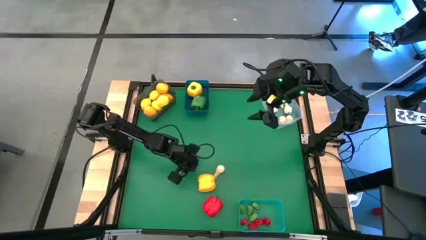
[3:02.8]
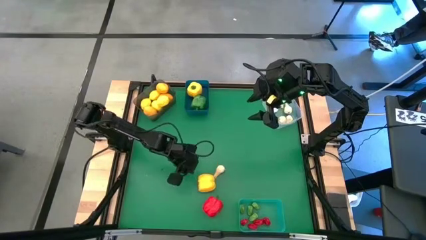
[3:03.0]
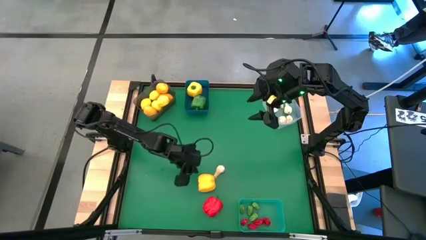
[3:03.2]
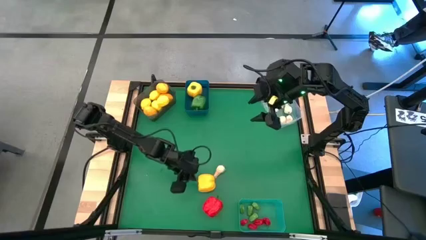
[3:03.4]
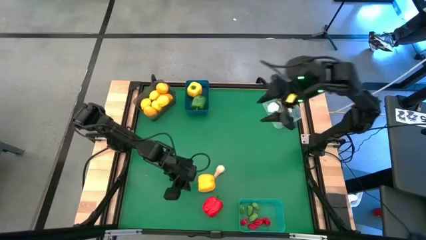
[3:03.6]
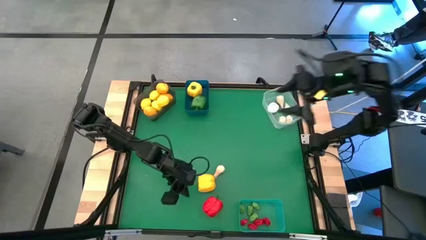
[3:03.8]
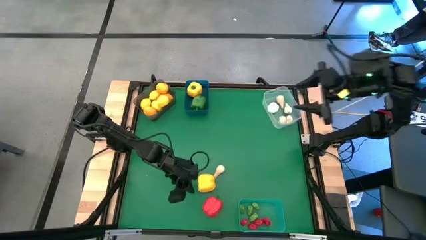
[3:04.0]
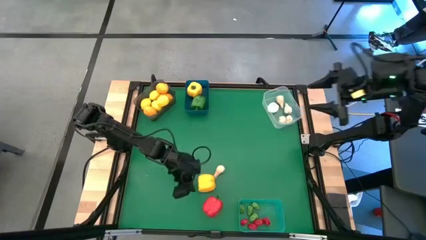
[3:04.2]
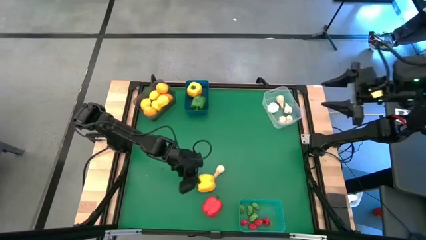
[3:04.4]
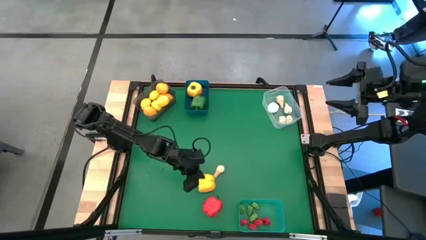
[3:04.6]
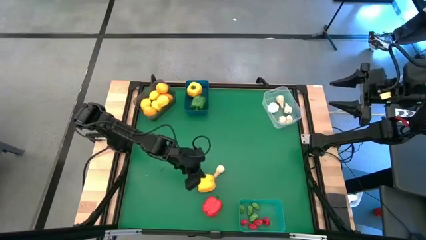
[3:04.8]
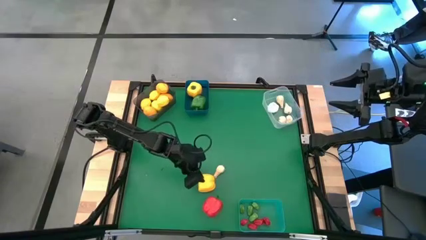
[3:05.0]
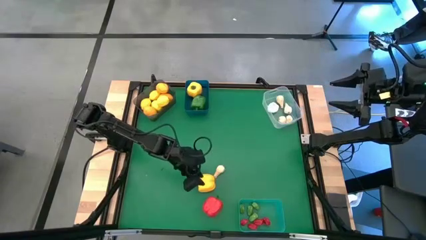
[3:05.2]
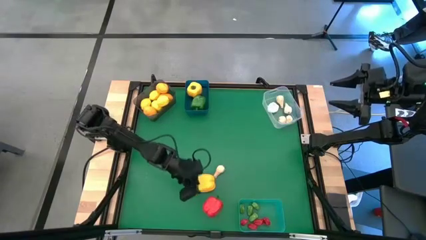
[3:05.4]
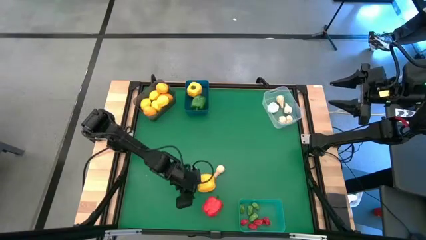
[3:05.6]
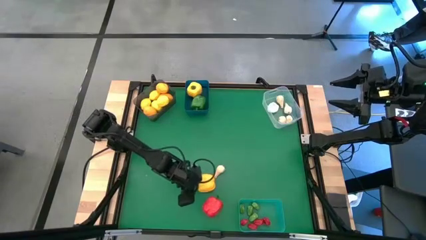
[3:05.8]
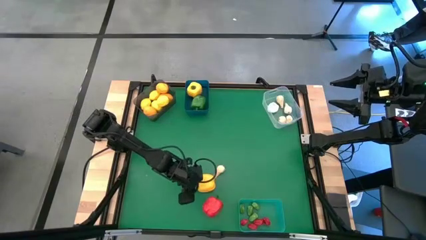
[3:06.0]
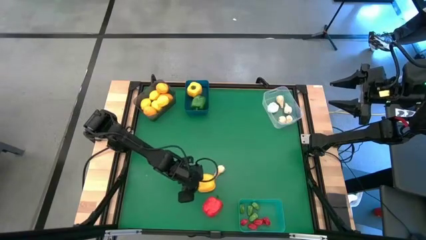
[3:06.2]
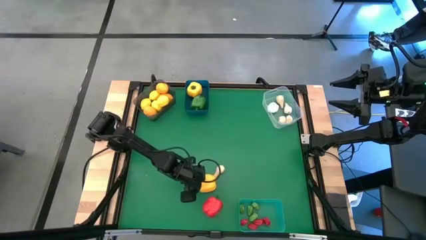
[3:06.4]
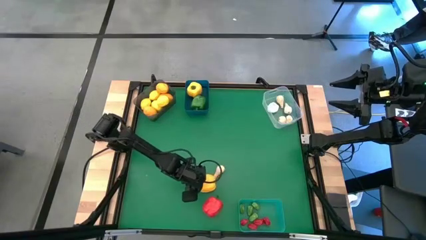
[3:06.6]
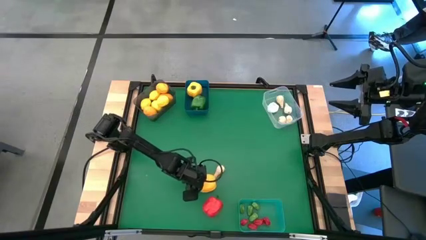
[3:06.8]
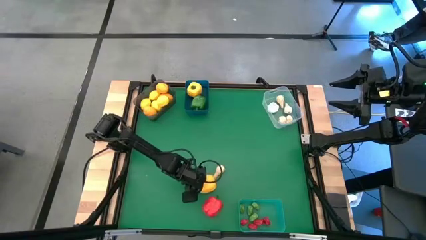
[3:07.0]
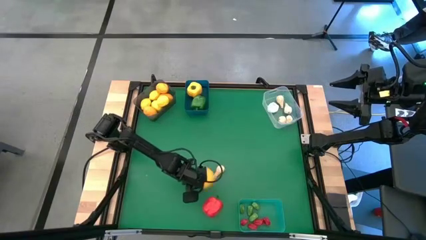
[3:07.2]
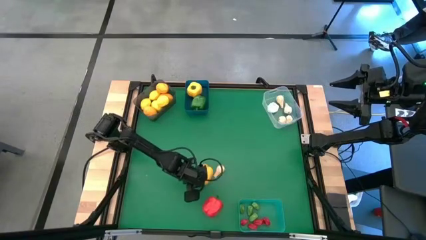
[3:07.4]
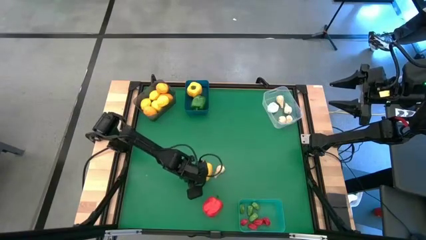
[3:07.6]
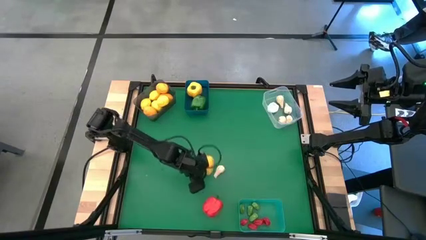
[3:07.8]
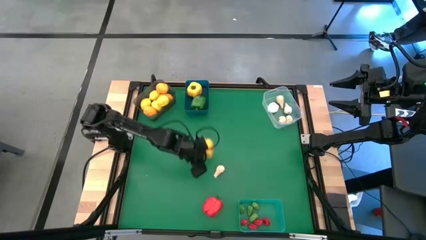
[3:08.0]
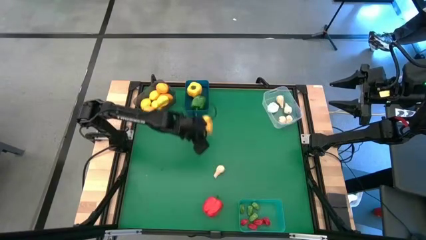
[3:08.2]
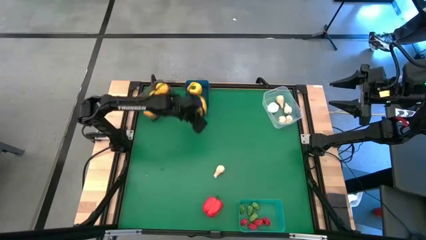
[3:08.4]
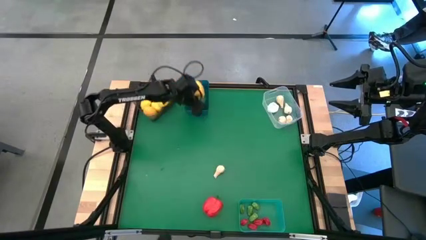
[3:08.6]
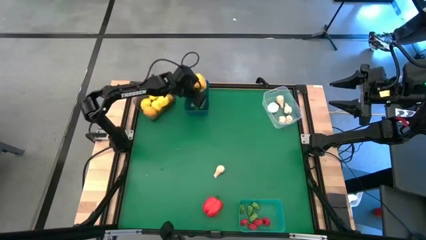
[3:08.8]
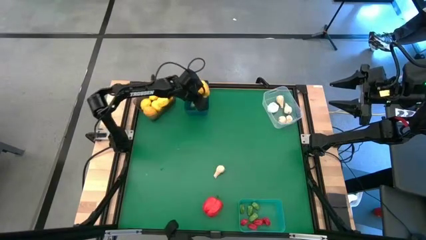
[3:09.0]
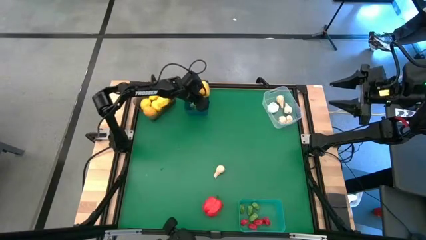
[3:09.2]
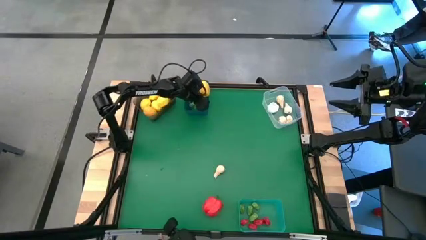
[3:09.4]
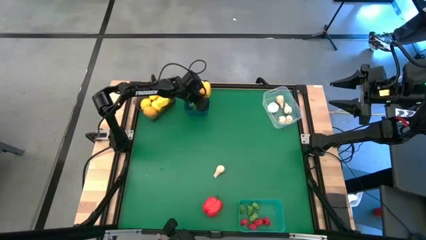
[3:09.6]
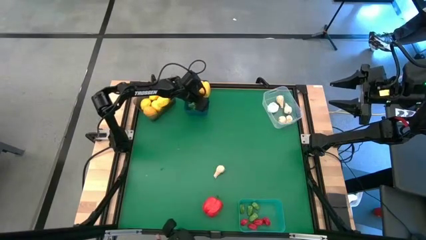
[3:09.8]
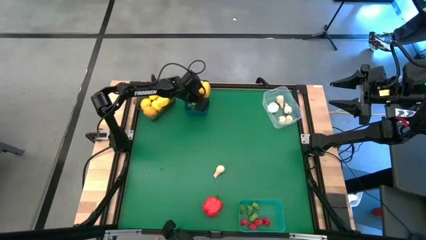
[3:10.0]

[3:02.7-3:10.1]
Task: Sort produce into baskets
Put the yellow bell pepper into the blue bin

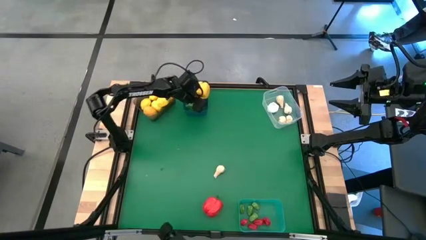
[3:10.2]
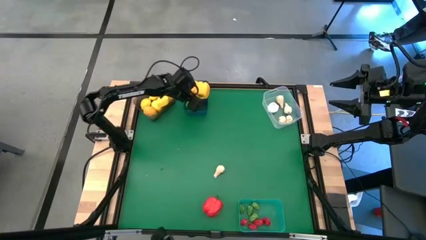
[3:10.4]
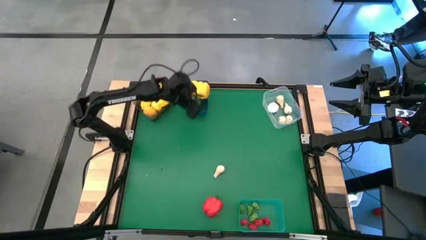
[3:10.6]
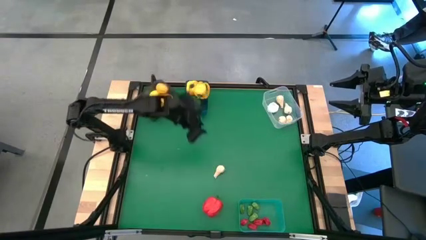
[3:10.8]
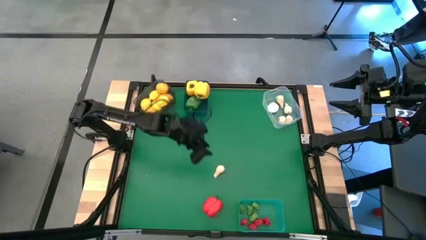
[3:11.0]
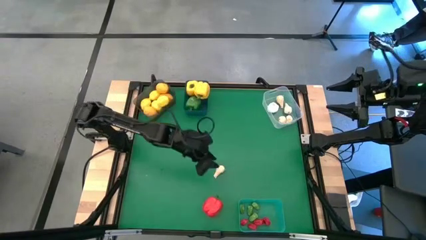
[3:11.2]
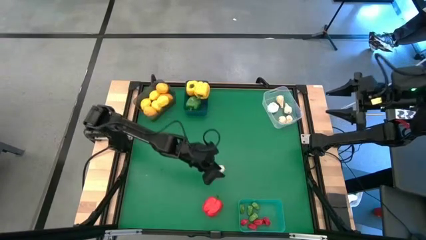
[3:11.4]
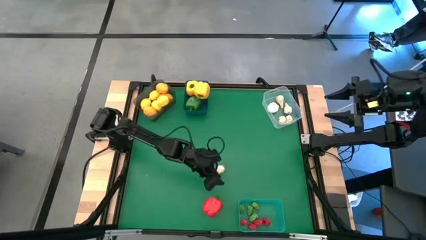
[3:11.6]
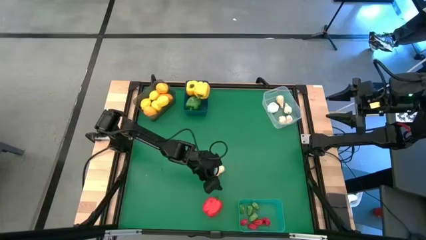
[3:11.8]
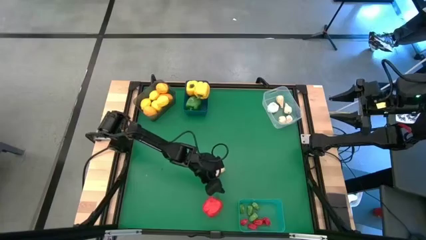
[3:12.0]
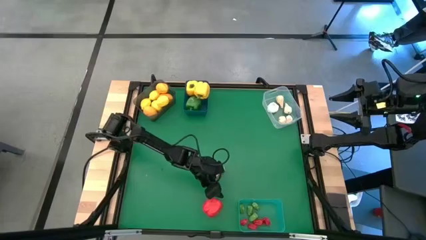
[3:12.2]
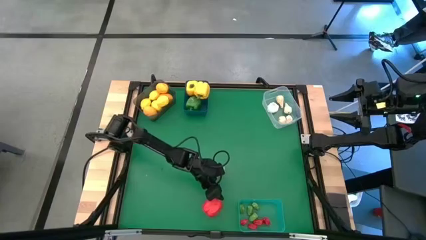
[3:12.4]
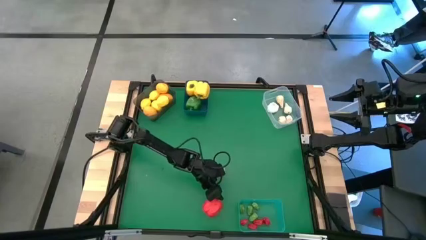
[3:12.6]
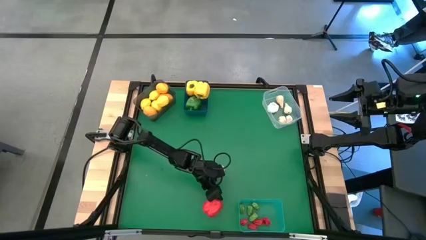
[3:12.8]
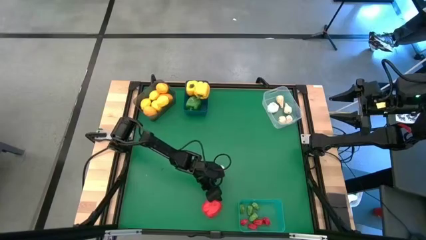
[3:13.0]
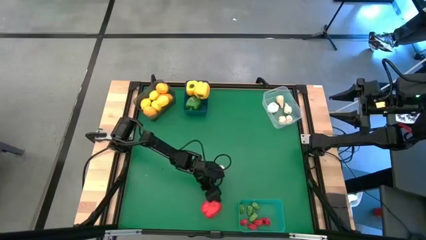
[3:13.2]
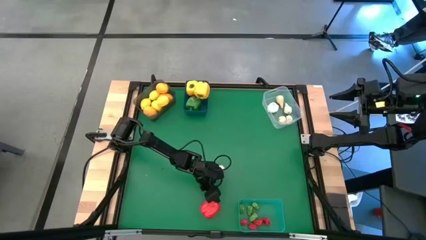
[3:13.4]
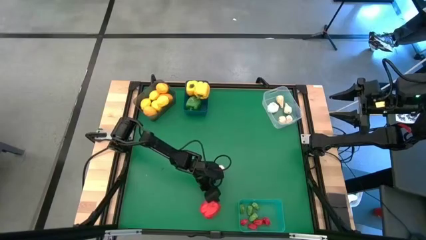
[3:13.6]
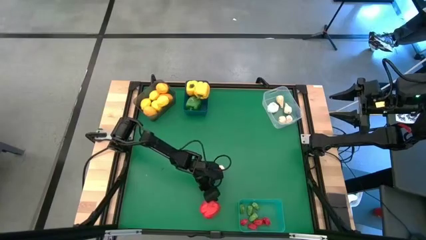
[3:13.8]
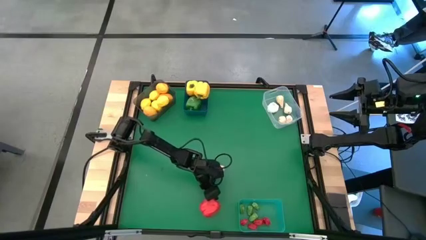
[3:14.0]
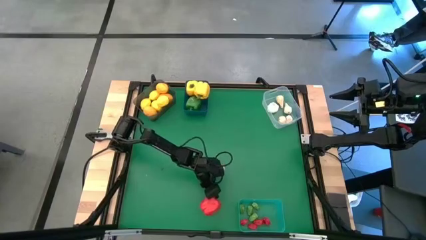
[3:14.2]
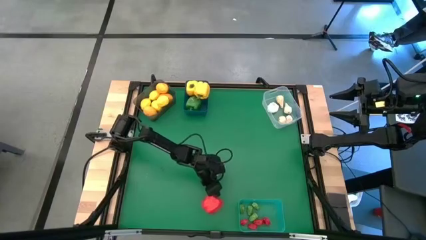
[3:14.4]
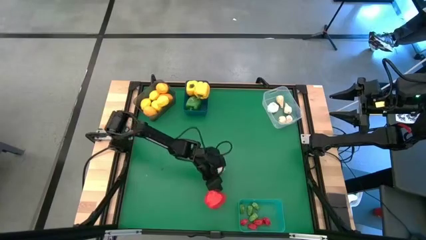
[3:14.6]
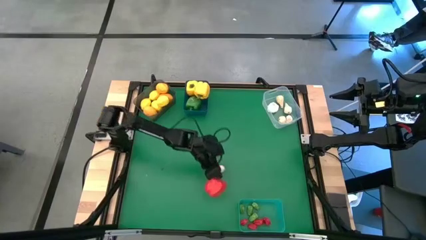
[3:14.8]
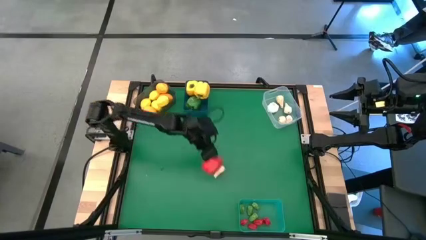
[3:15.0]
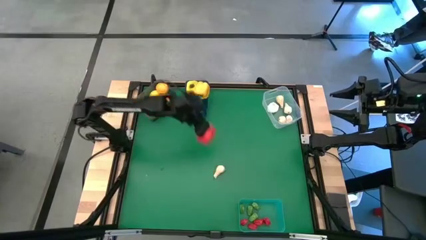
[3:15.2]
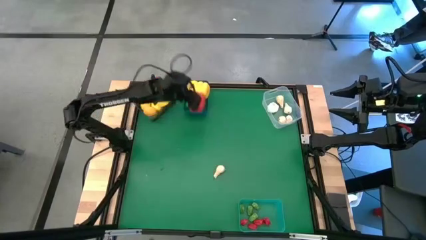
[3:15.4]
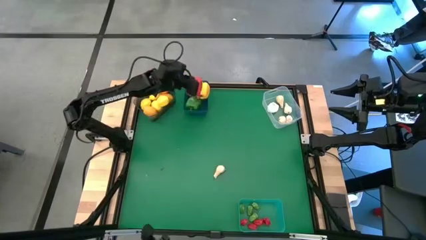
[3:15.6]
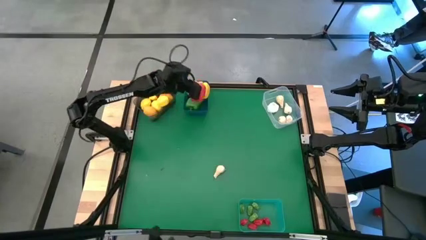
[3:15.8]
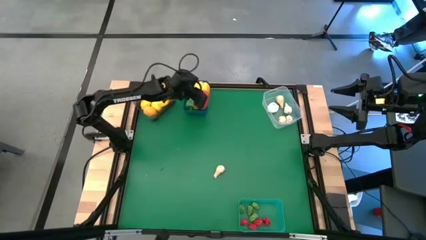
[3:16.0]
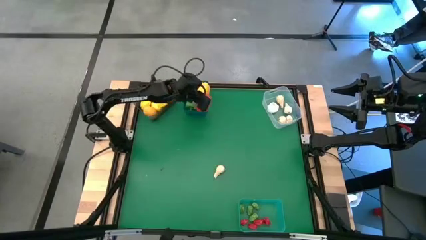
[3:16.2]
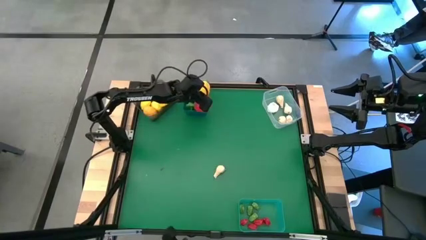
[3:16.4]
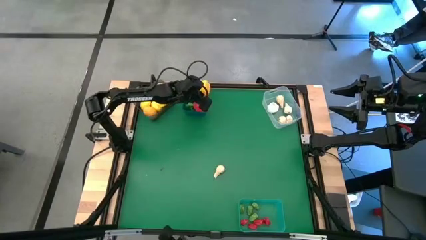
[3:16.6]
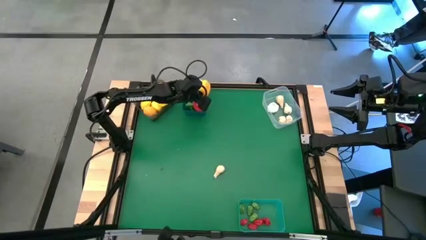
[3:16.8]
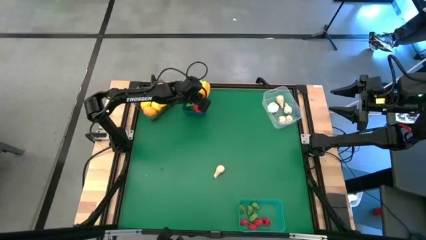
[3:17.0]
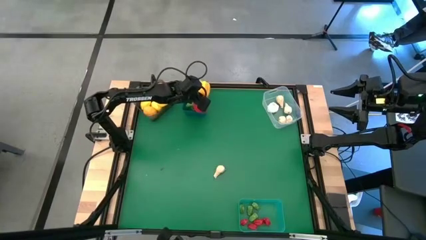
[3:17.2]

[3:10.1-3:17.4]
Put the red bell pepper into the blue bin
